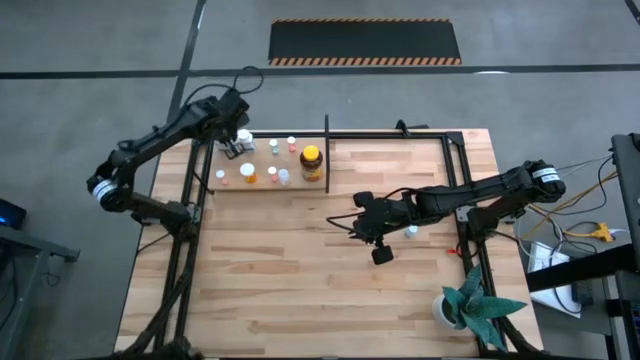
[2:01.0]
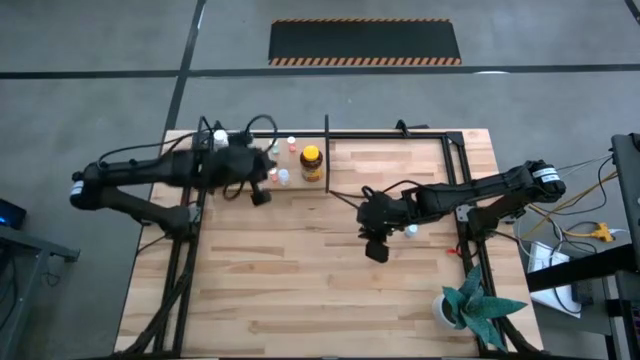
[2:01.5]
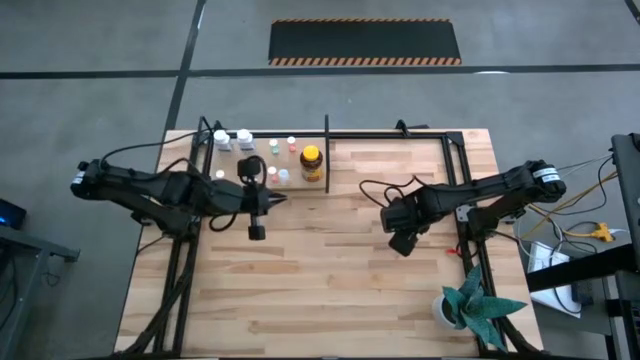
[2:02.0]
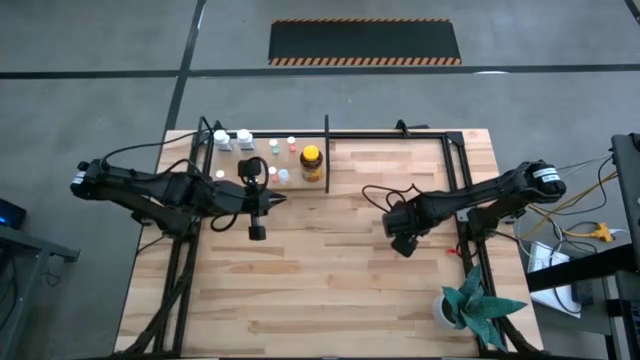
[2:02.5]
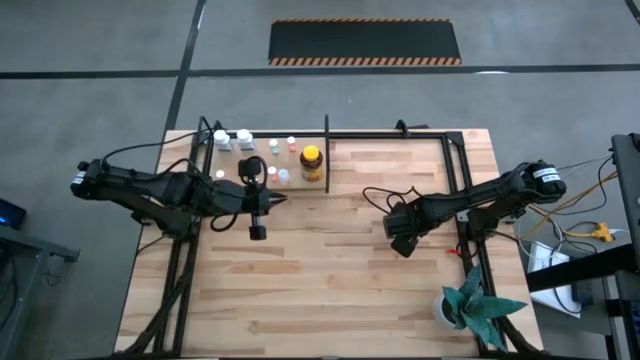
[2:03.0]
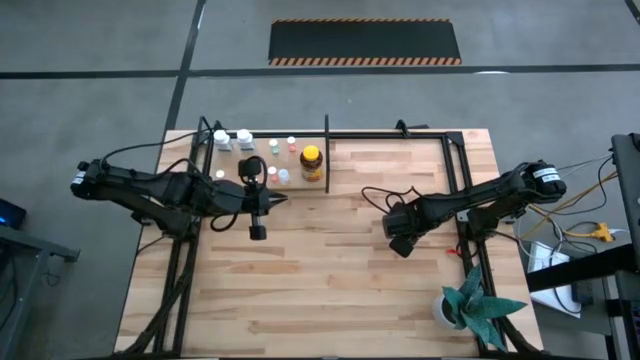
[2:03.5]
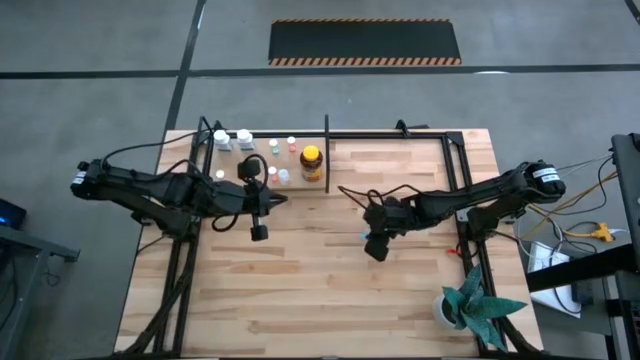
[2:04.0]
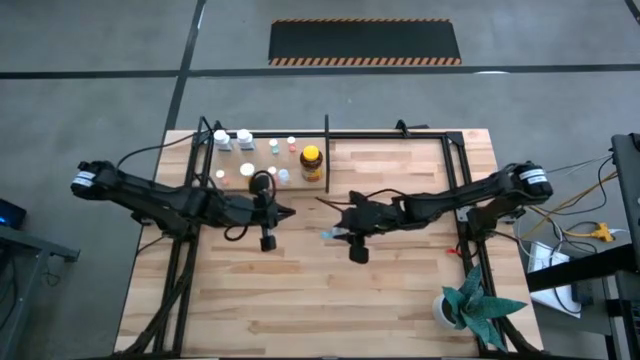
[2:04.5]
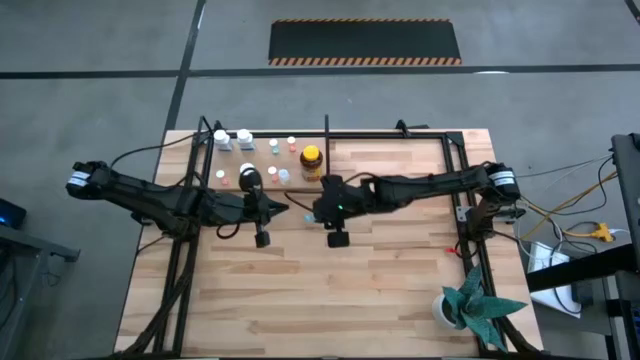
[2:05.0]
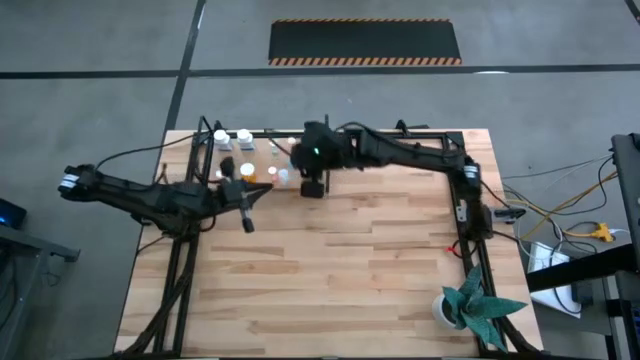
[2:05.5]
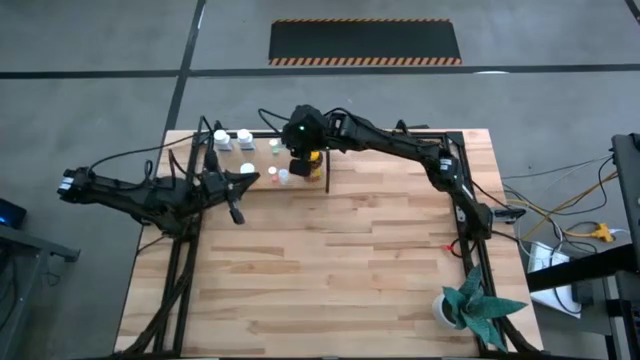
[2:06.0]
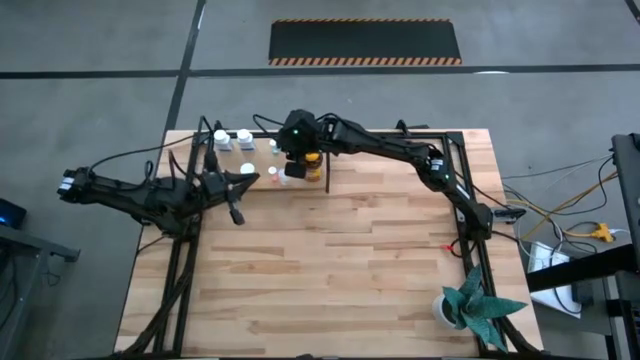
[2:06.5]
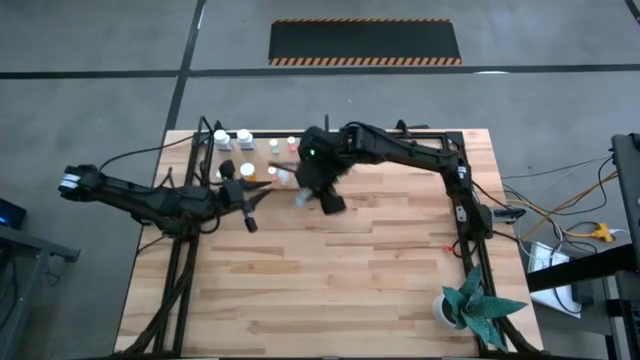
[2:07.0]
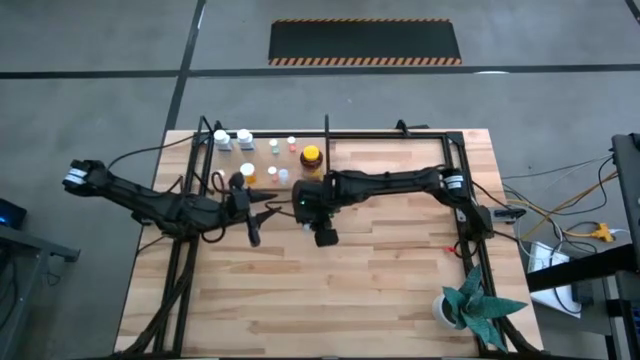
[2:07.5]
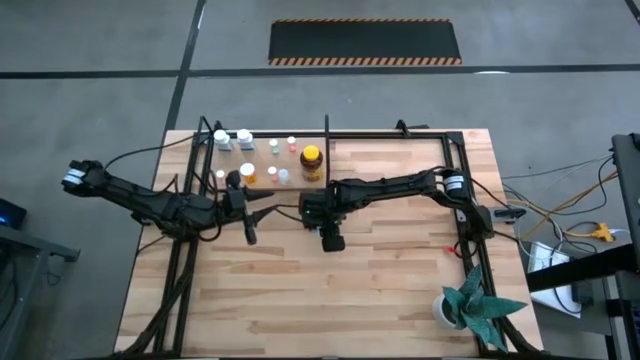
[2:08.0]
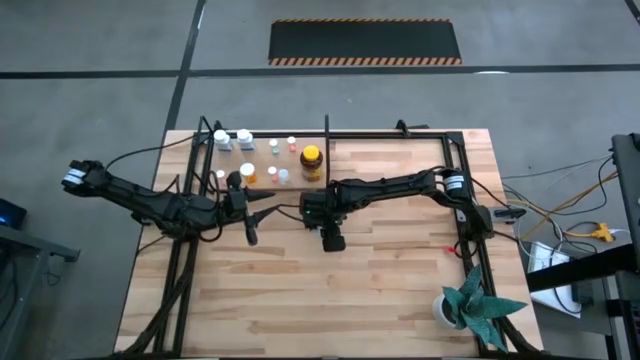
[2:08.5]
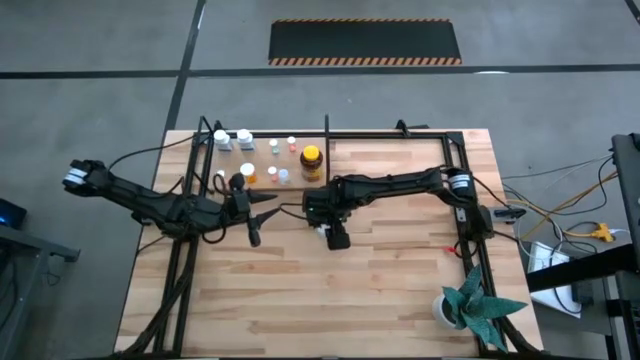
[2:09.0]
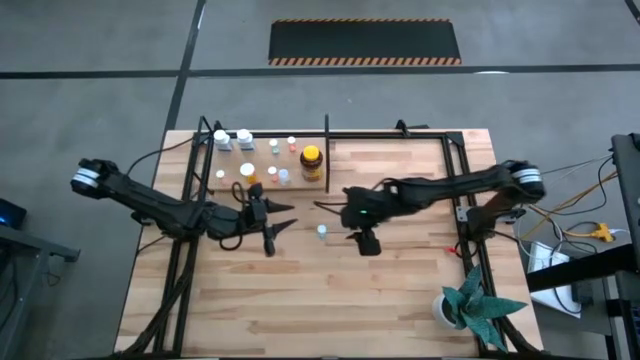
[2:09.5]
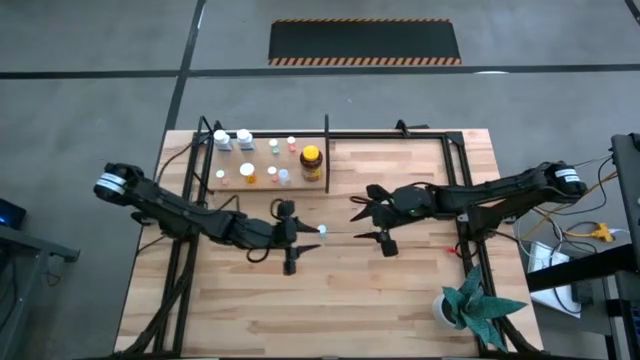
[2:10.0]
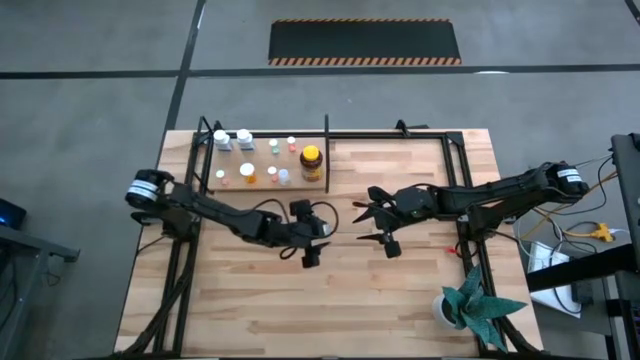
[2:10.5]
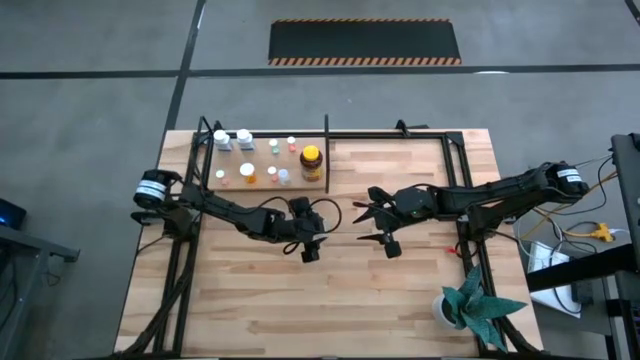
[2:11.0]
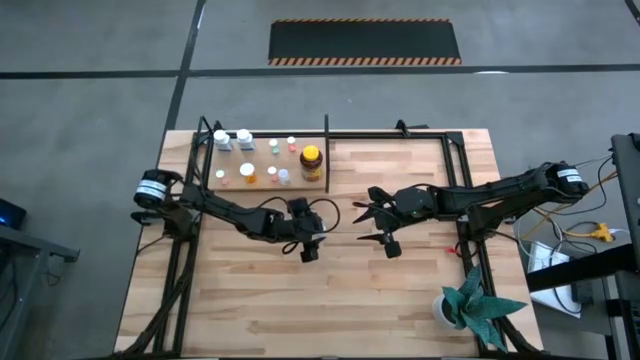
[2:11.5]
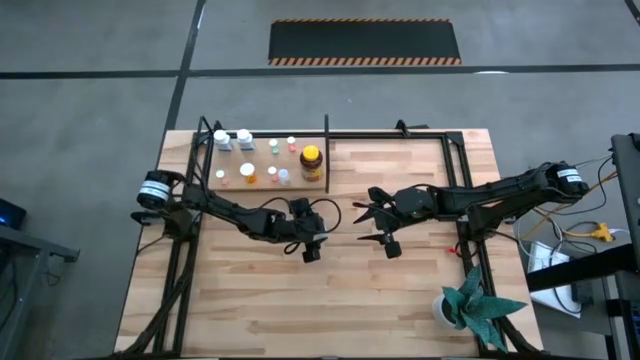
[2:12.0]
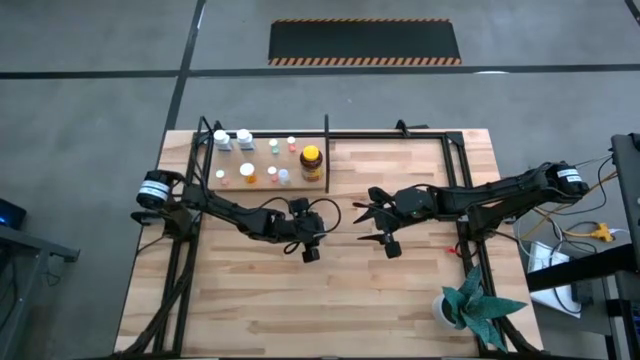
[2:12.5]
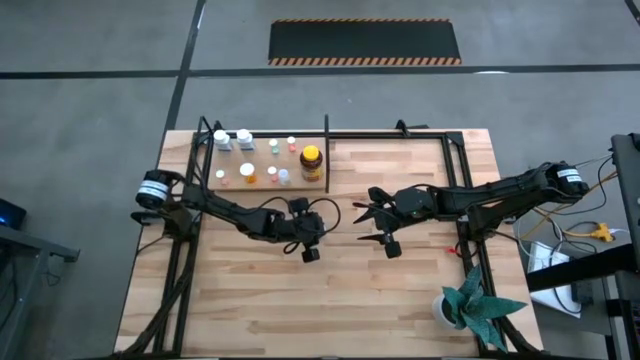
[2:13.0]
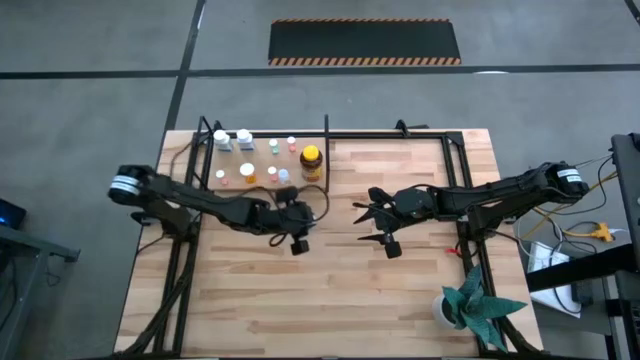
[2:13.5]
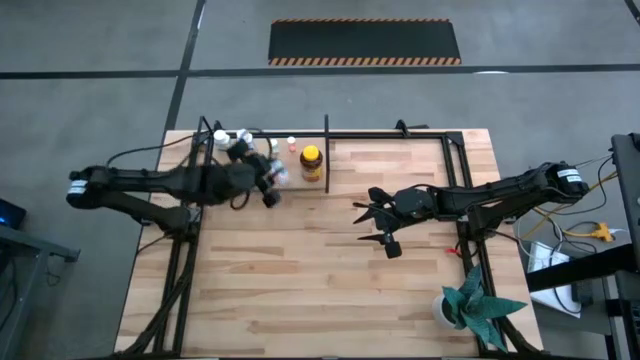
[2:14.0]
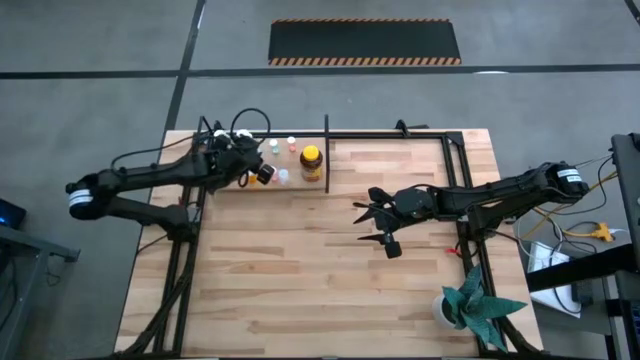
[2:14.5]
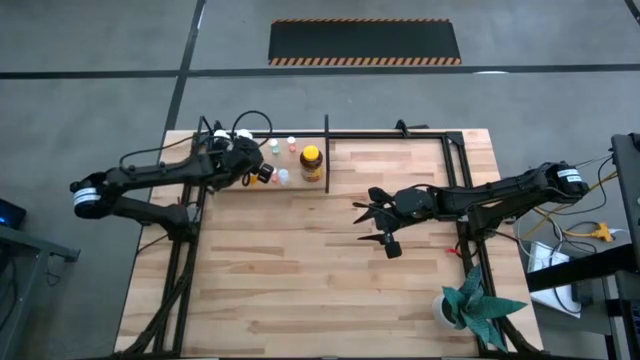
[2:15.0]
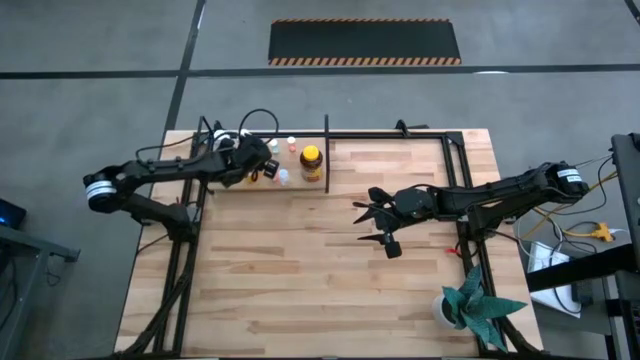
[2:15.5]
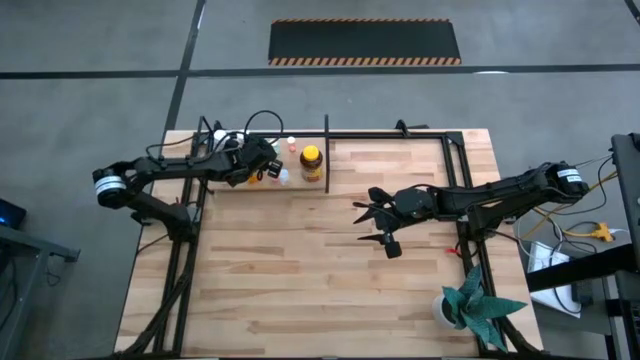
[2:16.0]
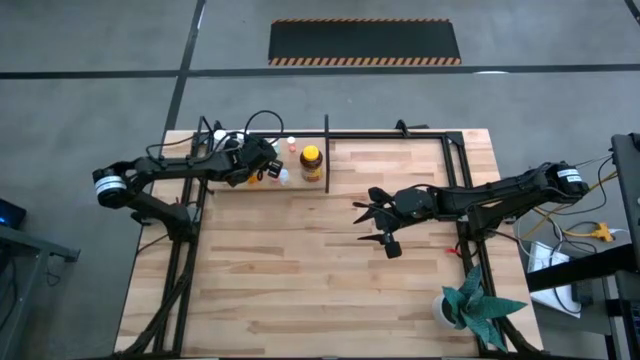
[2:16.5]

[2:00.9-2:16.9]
Task: Pick and place medicine bottles onto shelf by color
Put the blue pill bottle on the shelf

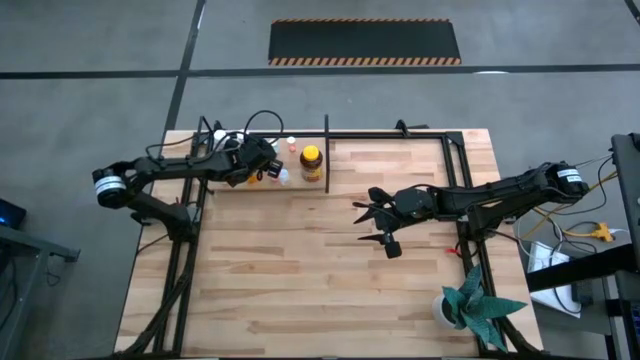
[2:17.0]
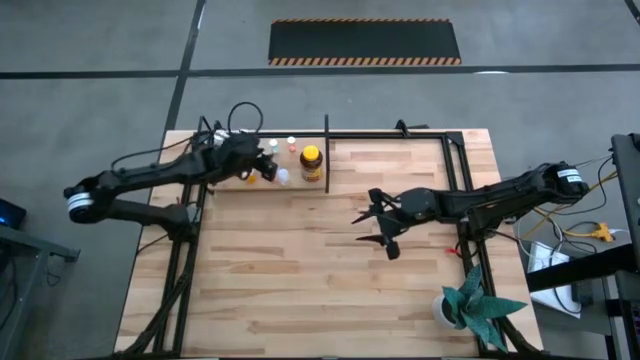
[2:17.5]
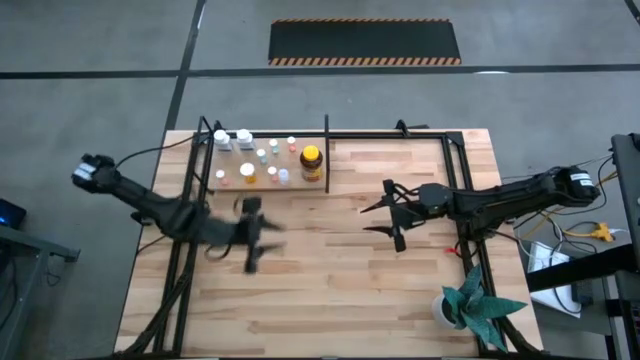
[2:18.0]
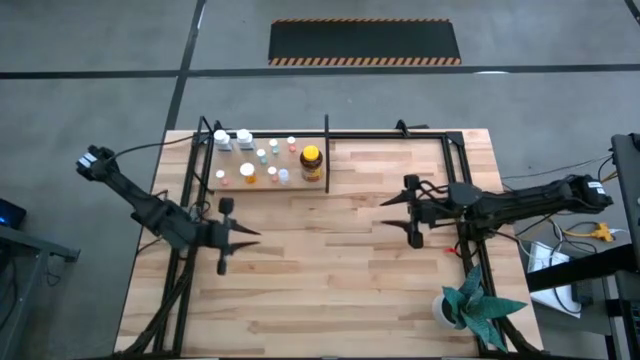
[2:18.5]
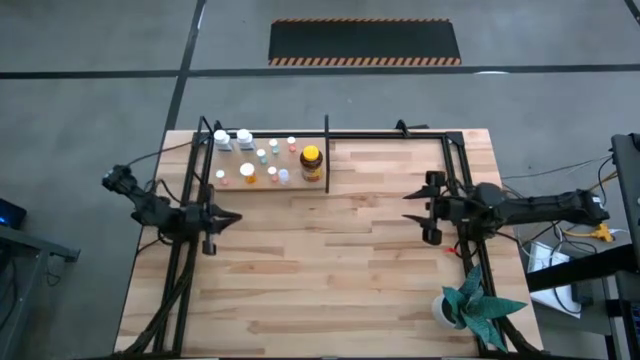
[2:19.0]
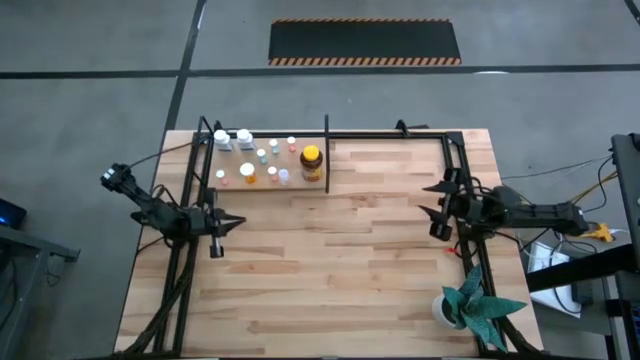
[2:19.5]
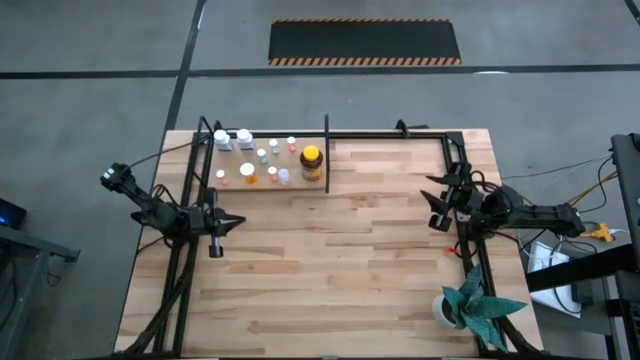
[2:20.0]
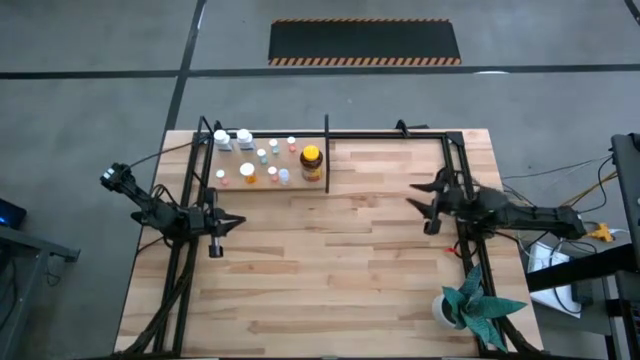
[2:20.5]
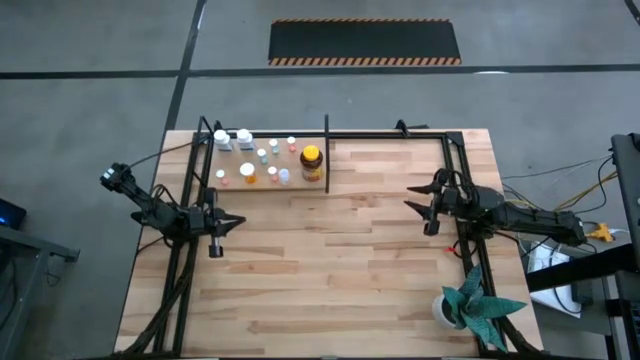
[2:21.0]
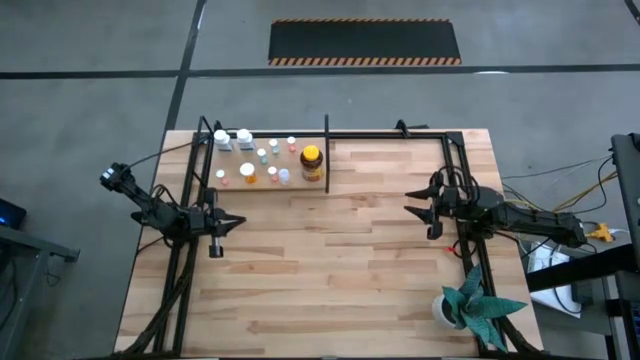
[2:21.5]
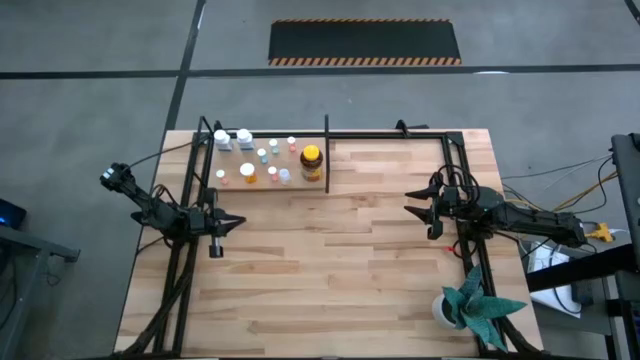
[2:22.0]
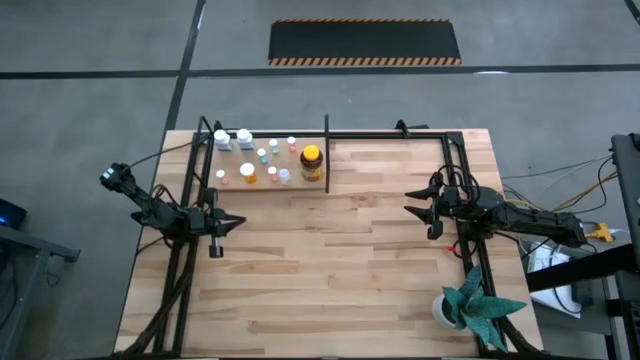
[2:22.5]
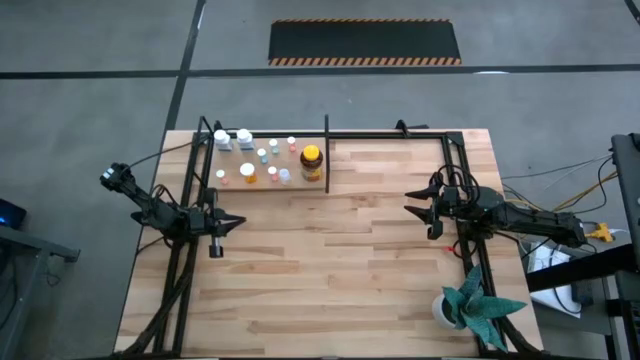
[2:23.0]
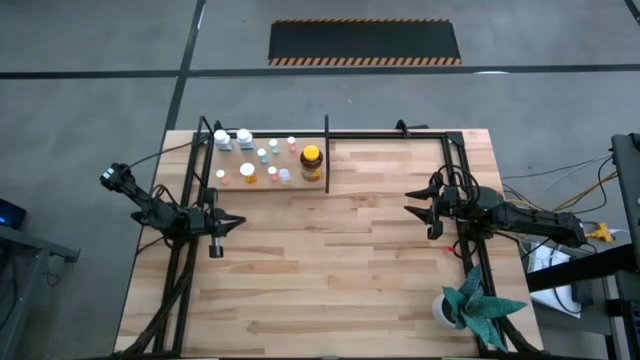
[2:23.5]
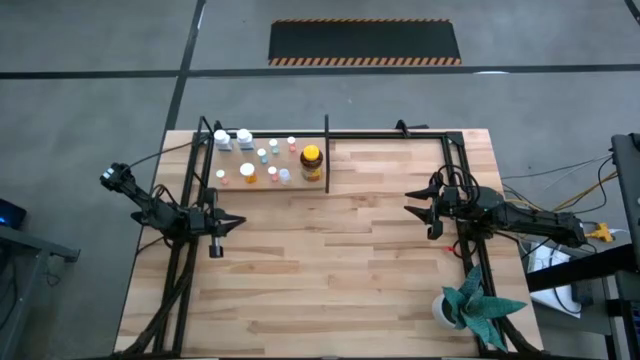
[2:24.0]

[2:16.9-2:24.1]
Return to Home Position
